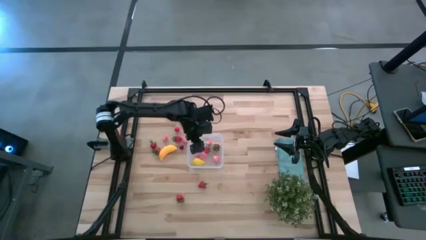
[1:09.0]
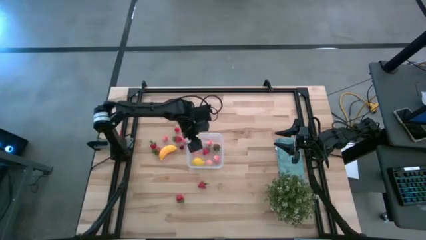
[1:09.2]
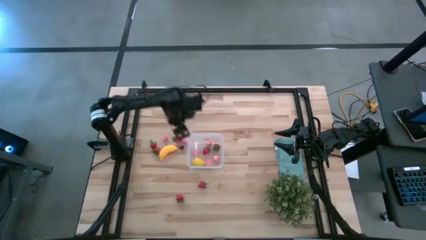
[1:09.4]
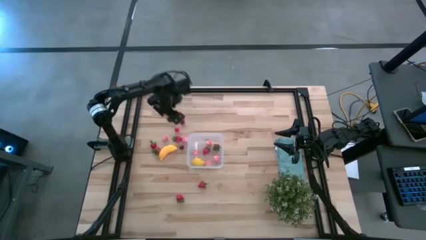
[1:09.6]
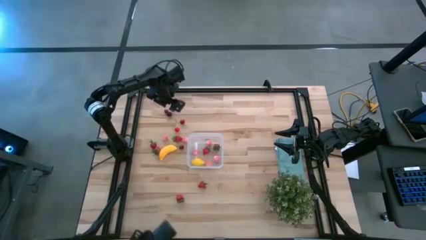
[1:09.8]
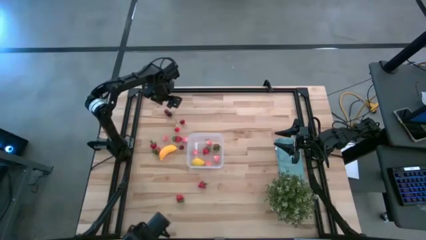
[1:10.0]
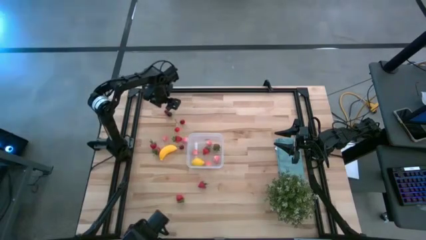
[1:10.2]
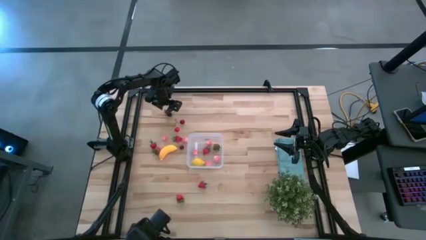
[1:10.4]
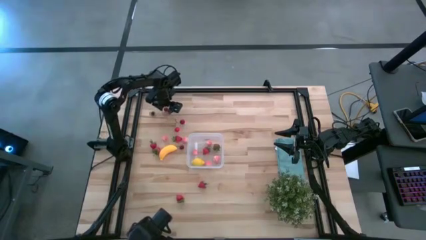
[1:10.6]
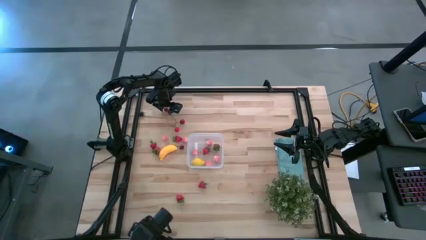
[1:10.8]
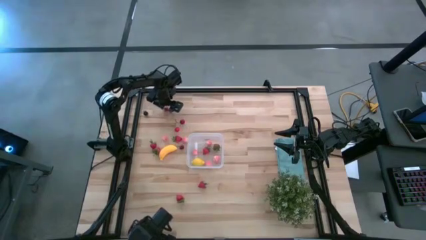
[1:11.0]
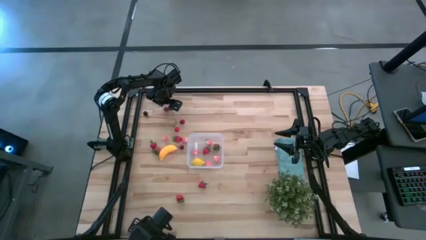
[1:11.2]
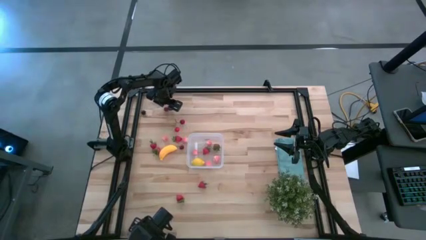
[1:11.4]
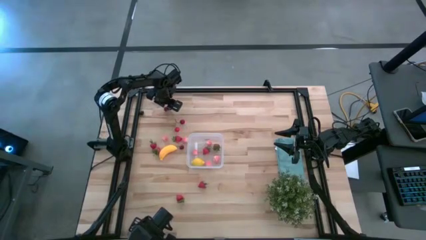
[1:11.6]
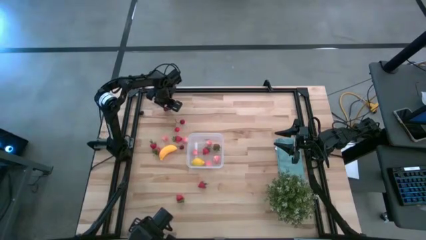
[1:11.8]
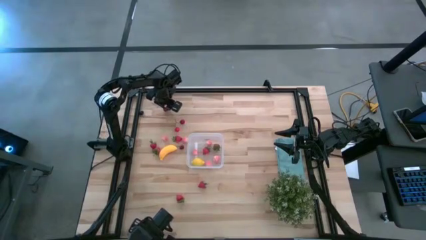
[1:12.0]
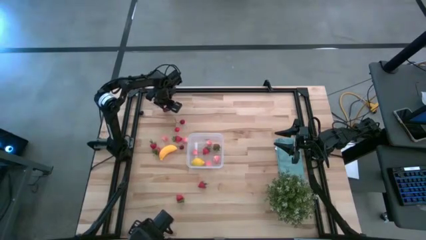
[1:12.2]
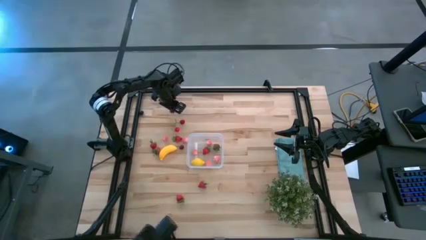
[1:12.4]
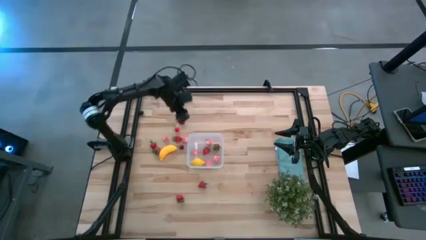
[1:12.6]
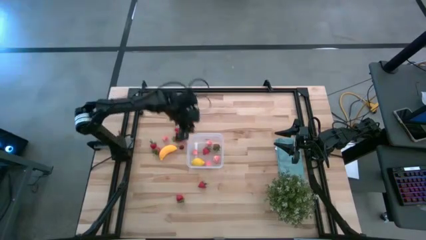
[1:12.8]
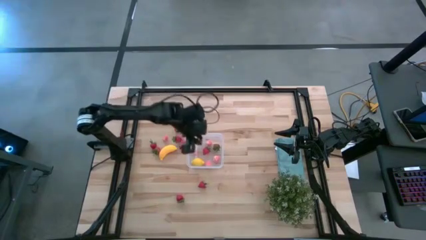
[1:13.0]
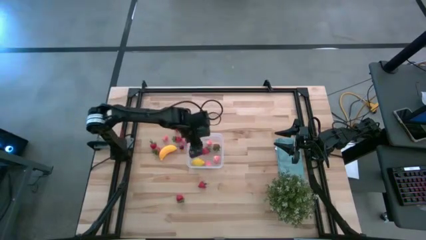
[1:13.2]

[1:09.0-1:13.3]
Task: Pick and placing Produce into tupperware
Put the red cherry into the transparent bin

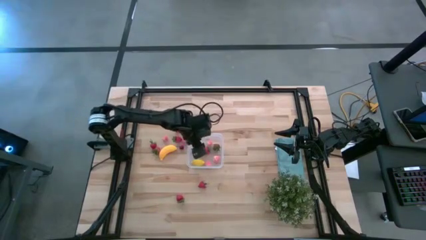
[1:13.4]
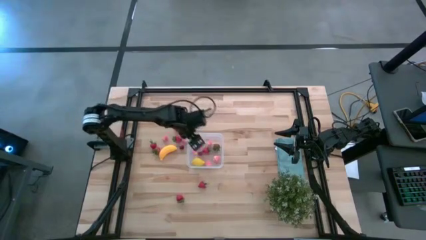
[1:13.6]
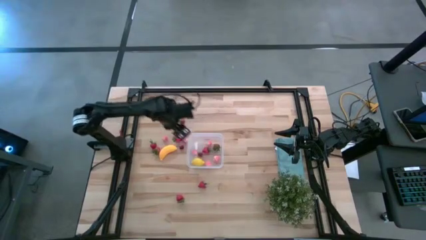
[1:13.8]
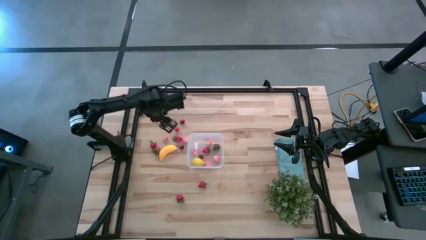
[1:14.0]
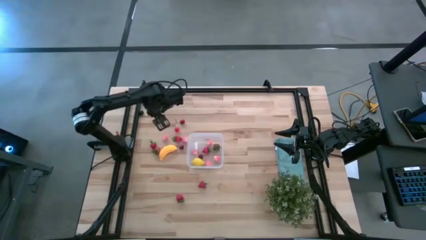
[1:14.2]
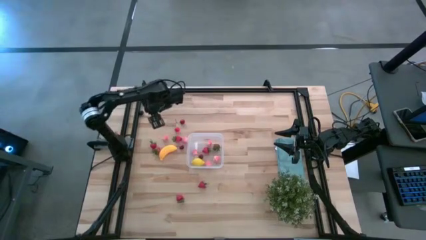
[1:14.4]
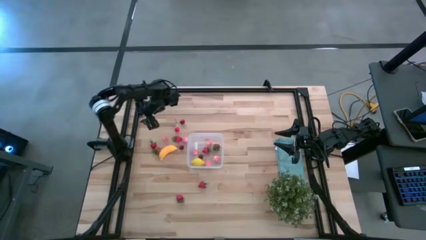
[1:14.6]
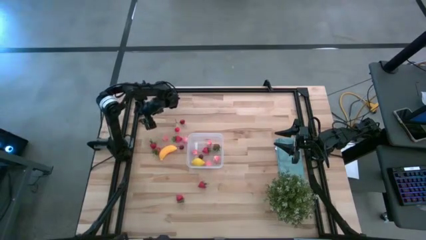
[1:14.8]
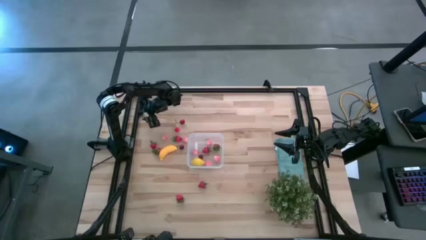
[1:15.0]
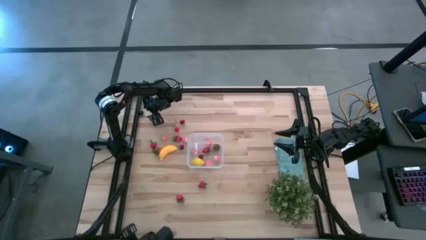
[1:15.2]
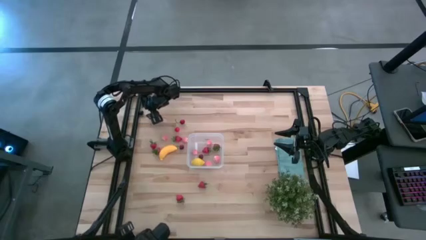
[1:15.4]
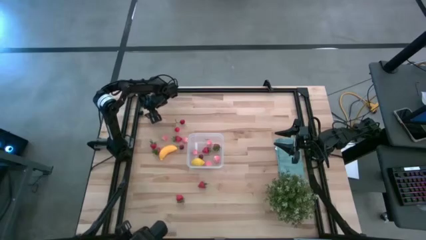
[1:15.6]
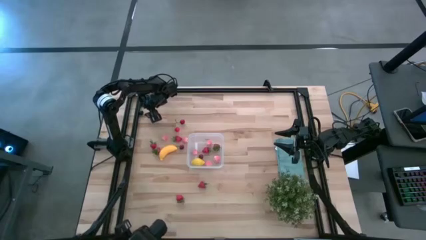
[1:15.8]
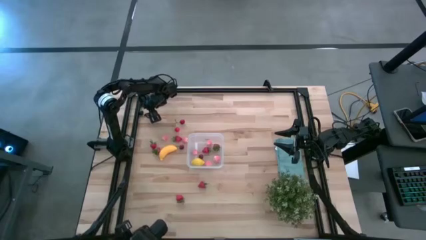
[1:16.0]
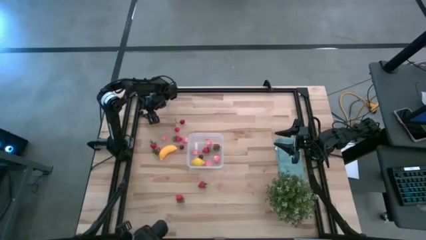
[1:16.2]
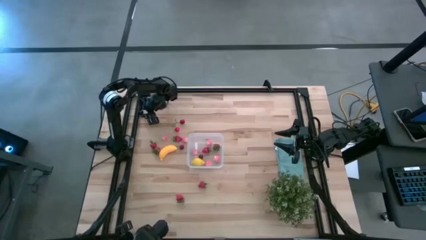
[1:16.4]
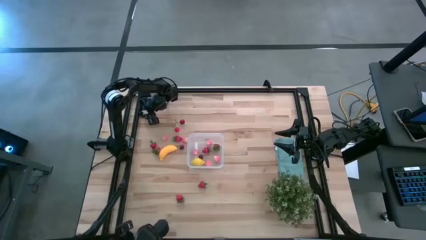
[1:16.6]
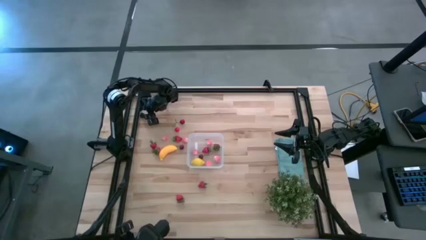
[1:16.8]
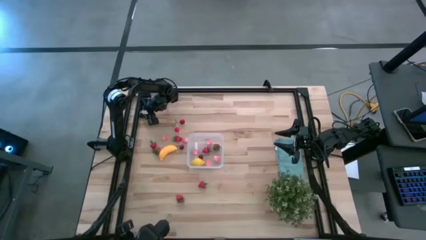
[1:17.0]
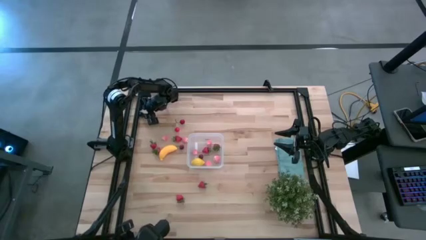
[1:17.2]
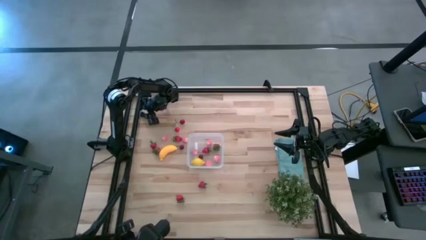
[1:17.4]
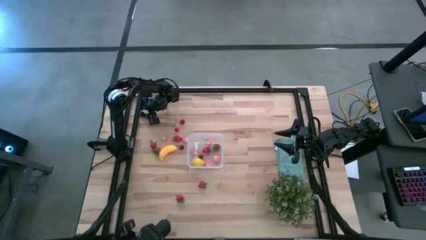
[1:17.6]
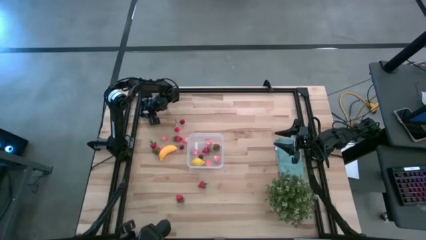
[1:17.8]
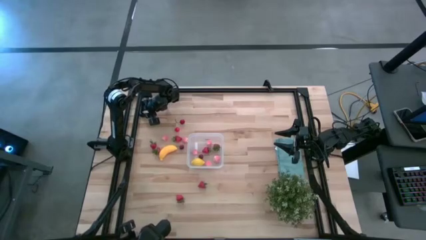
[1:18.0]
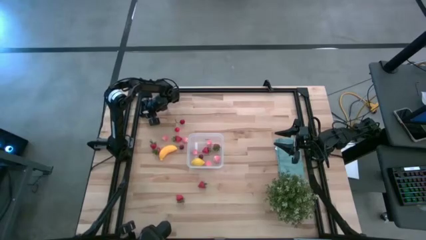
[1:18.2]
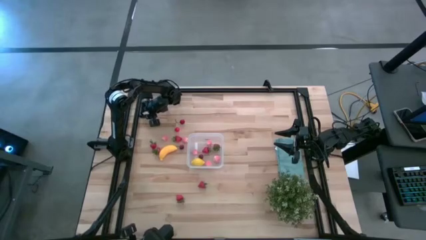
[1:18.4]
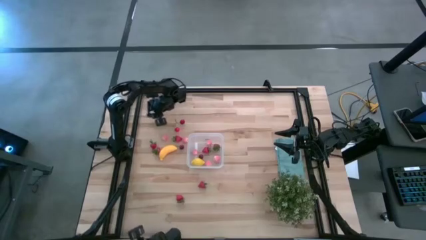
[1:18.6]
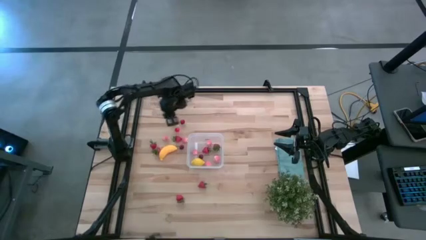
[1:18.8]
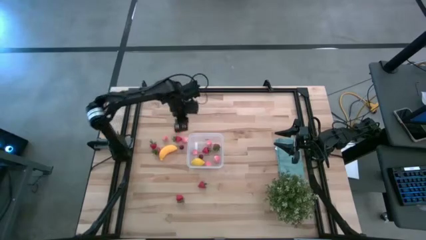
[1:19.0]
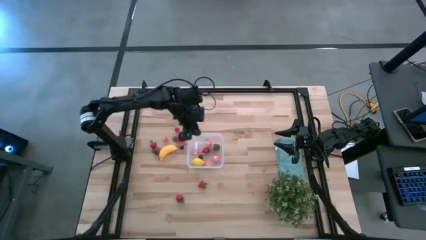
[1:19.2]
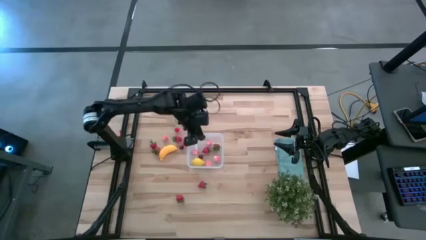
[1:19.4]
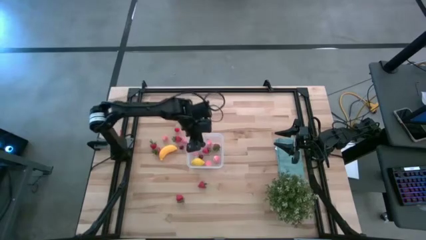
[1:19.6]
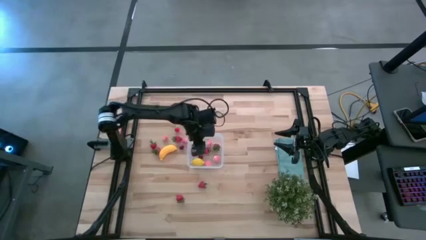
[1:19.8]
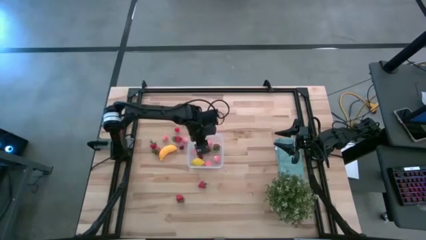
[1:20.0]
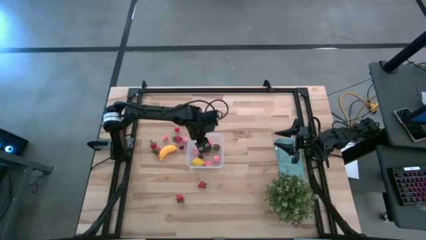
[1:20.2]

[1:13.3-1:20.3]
Put the black cherry into the transparent bin

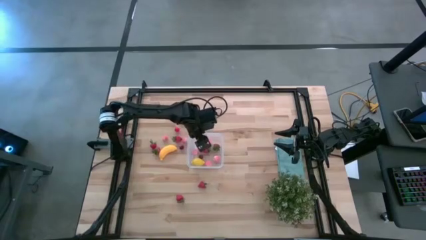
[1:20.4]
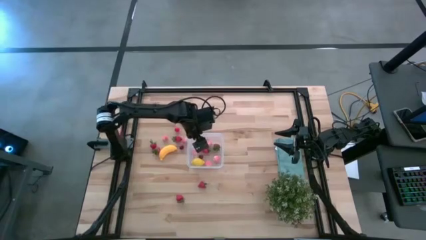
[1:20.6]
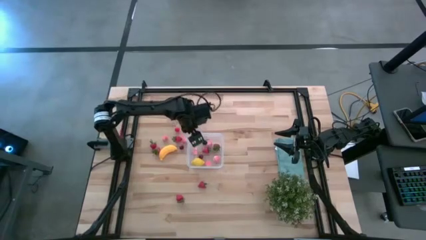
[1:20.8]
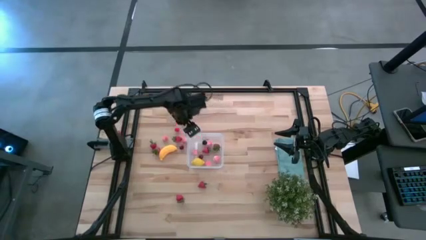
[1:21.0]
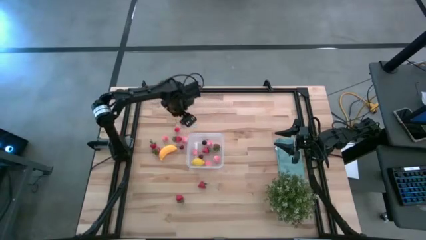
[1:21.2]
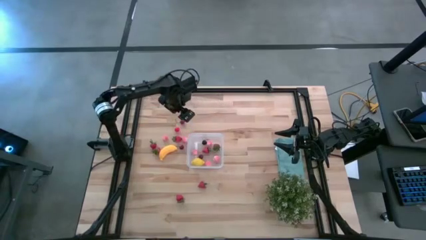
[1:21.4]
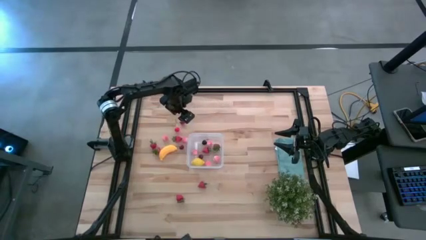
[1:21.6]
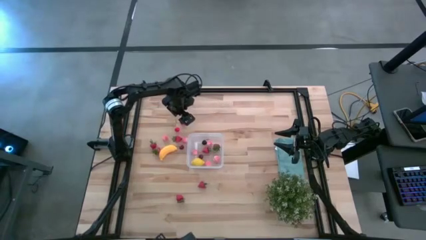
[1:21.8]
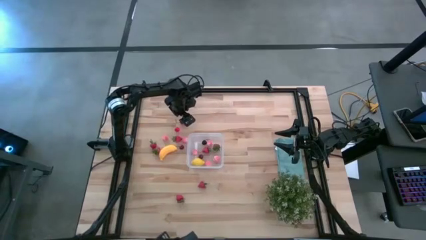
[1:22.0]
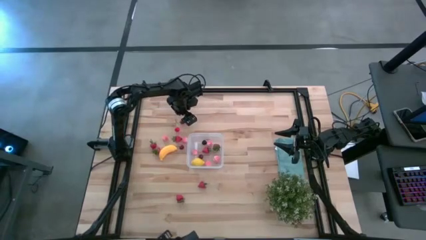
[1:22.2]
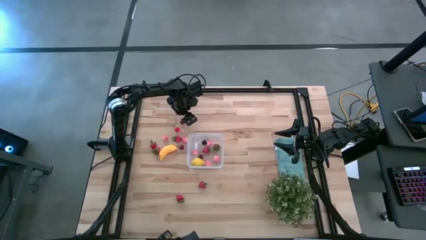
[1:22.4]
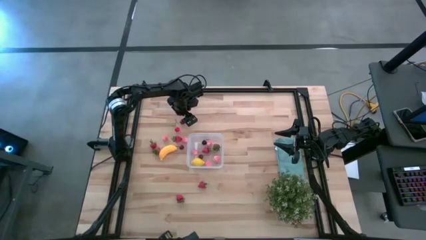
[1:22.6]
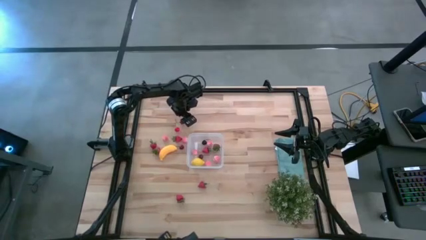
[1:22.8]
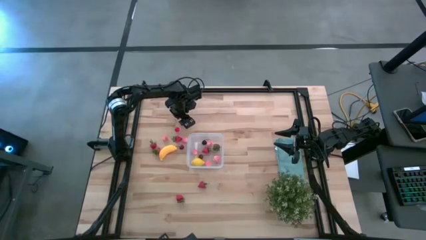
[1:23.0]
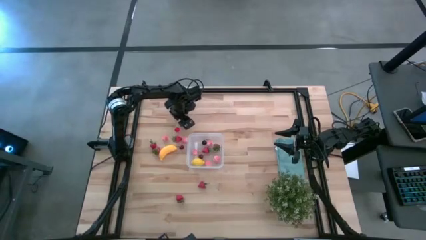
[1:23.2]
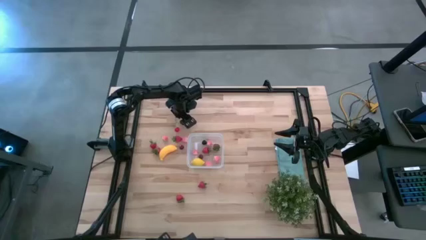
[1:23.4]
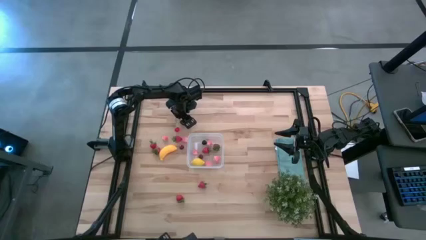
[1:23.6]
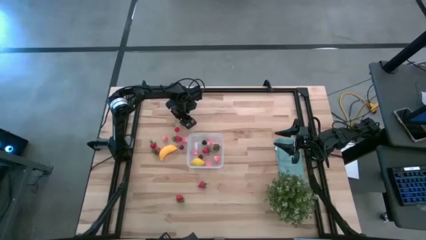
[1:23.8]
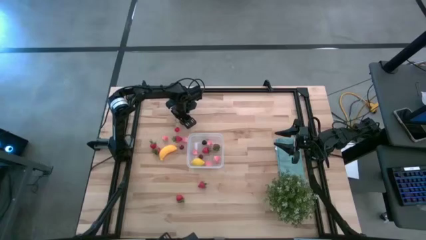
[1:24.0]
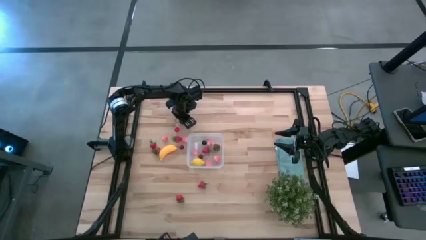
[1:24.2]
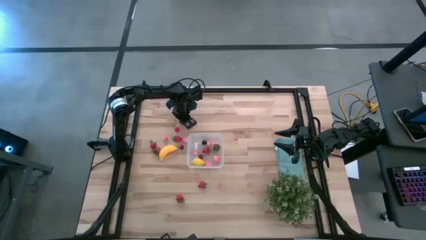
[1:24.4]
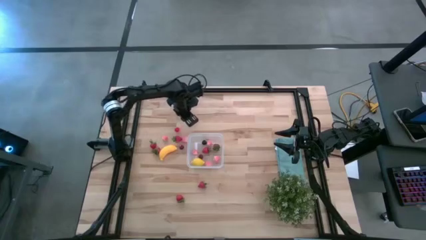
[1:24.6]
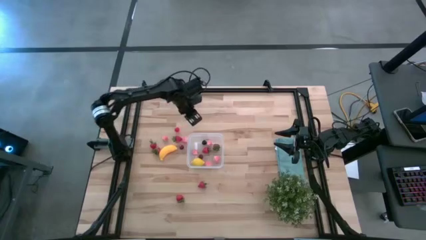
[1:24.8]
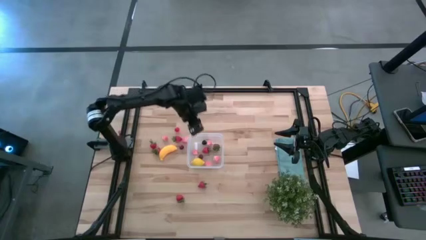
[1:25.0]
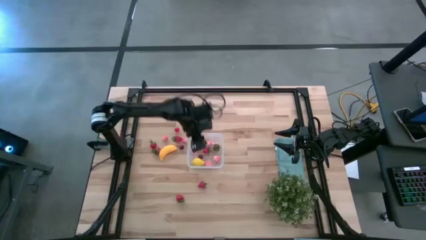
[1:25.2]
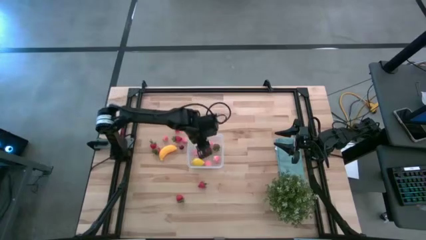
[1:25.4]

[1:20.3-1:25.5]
Put the red cherry into the transparent bin
